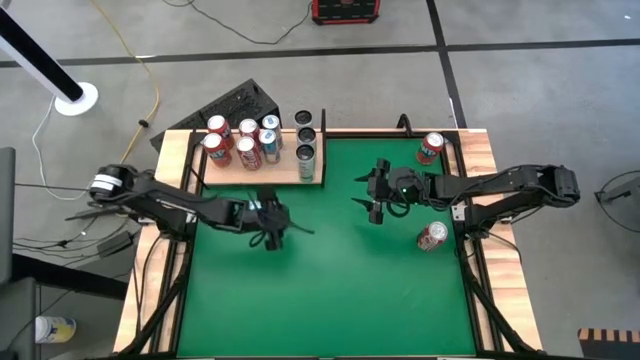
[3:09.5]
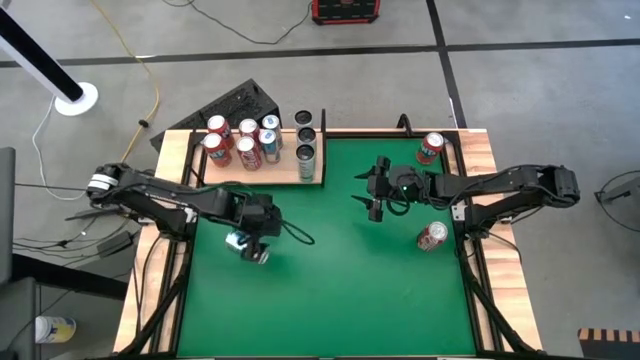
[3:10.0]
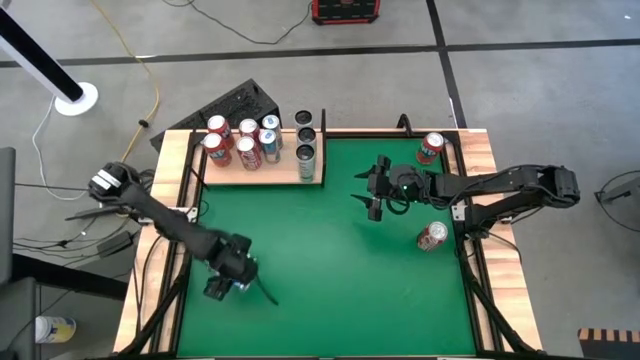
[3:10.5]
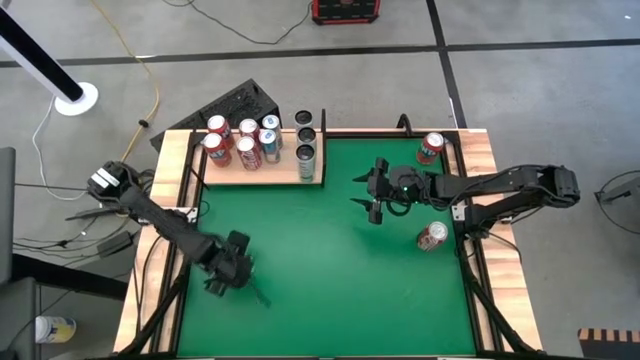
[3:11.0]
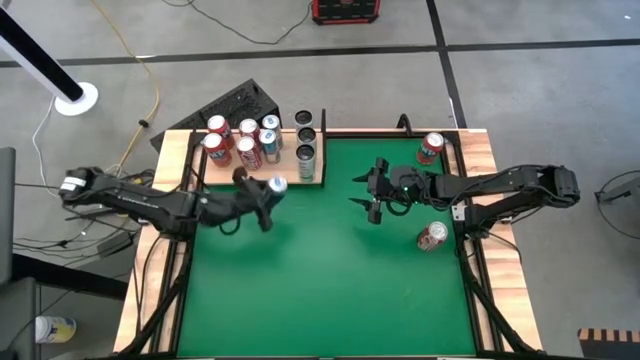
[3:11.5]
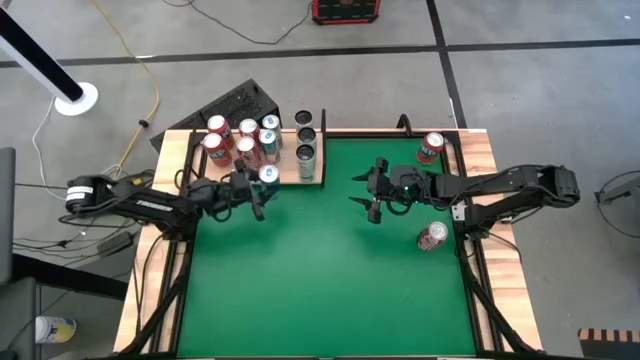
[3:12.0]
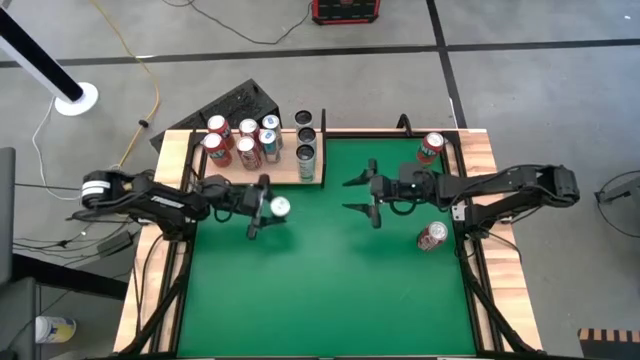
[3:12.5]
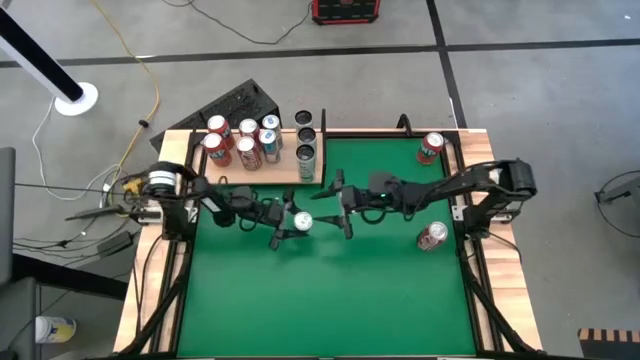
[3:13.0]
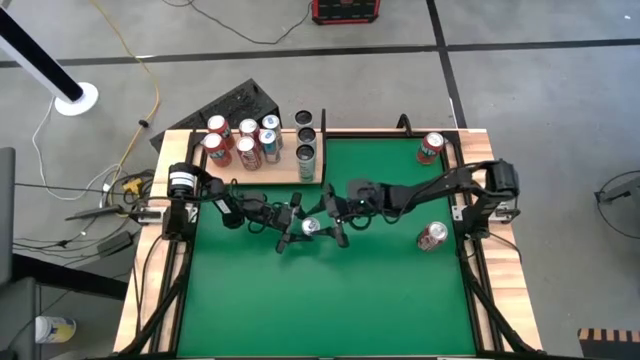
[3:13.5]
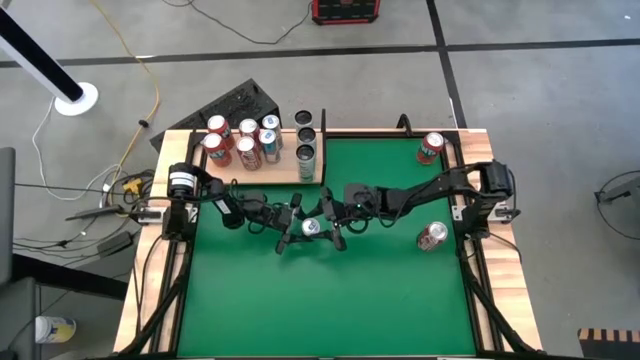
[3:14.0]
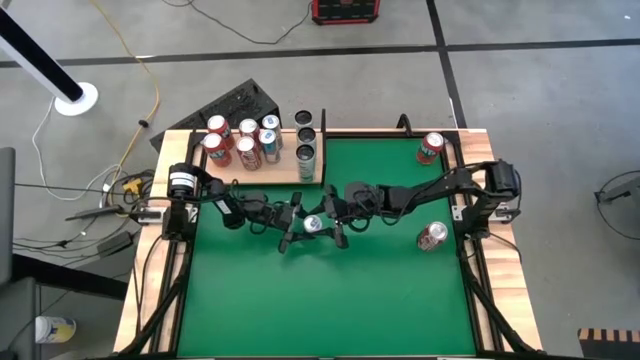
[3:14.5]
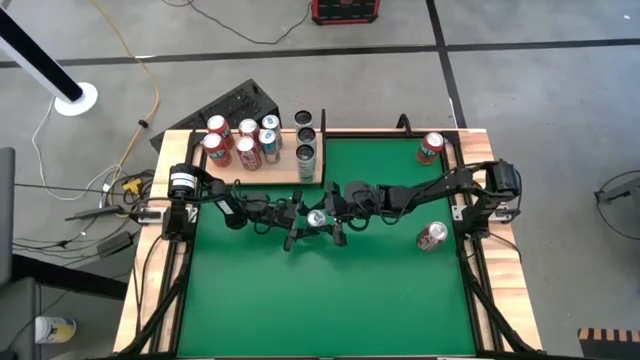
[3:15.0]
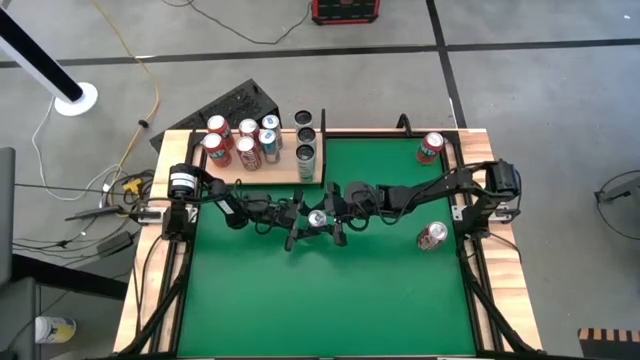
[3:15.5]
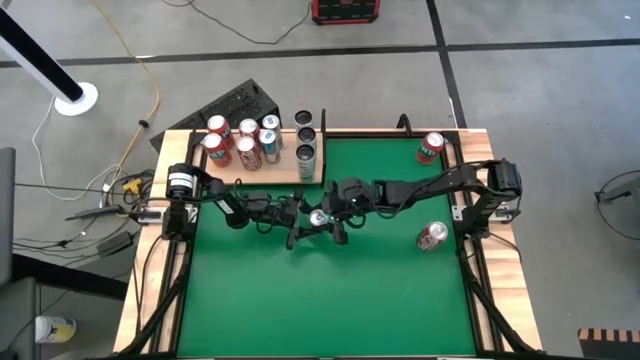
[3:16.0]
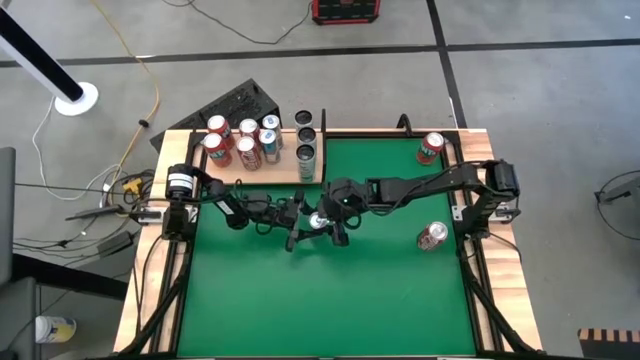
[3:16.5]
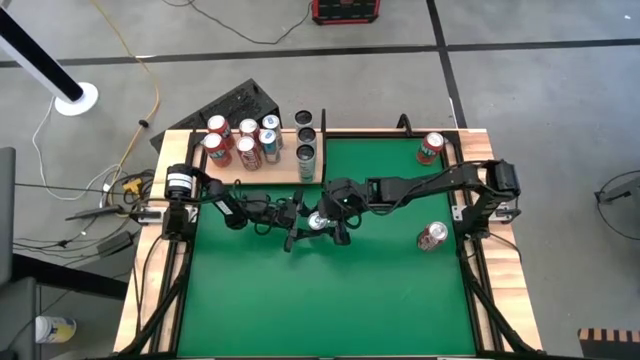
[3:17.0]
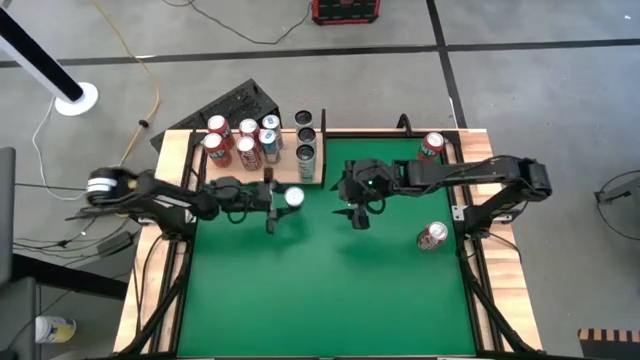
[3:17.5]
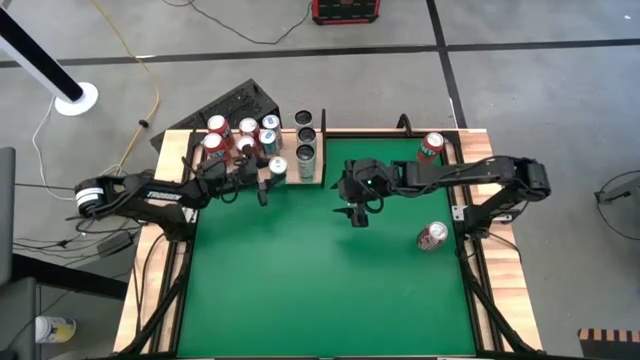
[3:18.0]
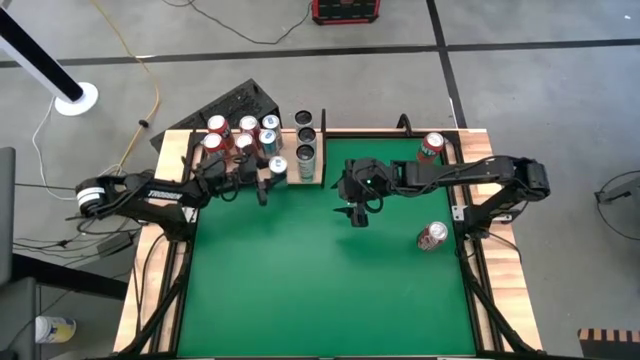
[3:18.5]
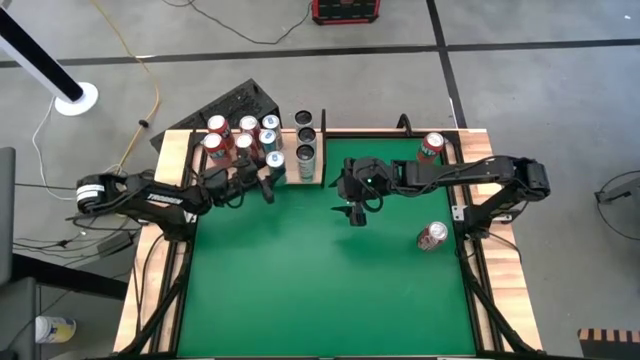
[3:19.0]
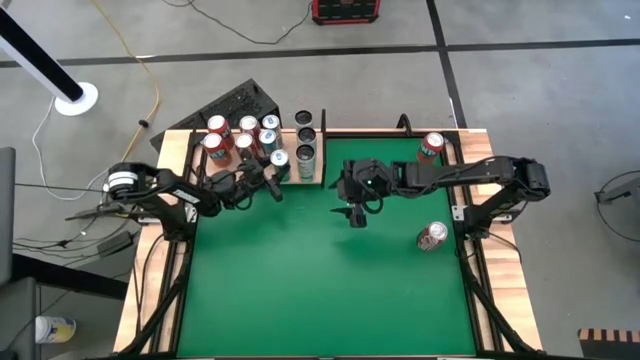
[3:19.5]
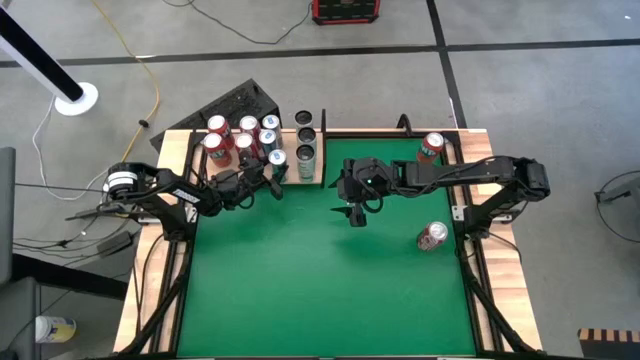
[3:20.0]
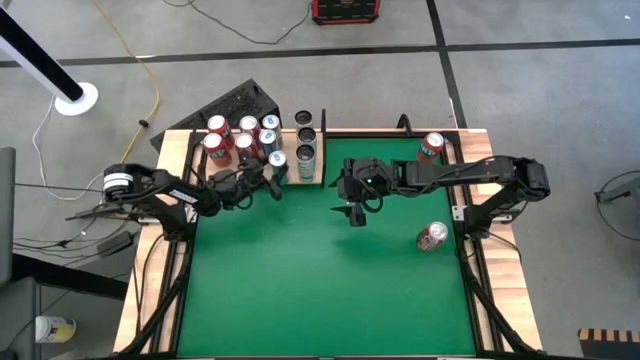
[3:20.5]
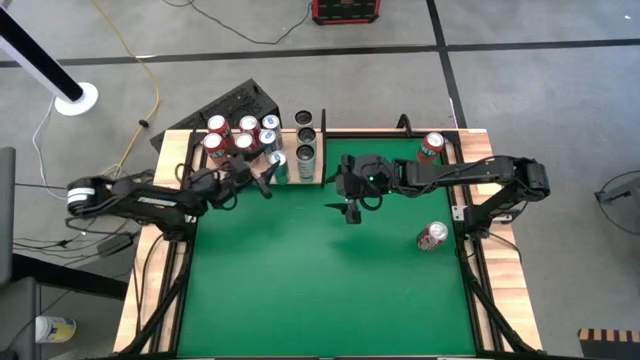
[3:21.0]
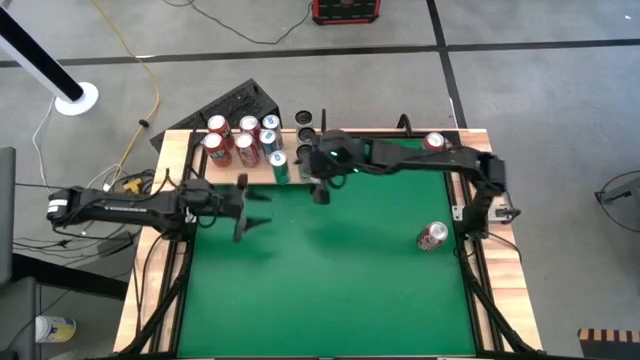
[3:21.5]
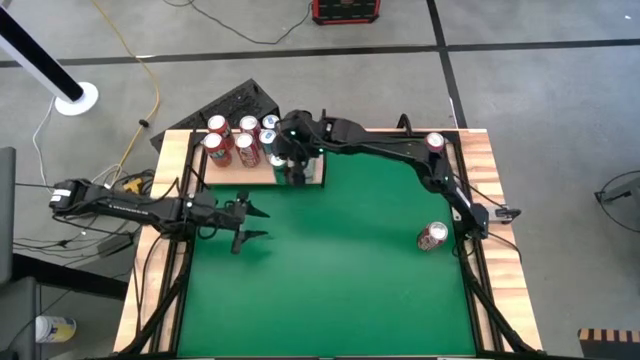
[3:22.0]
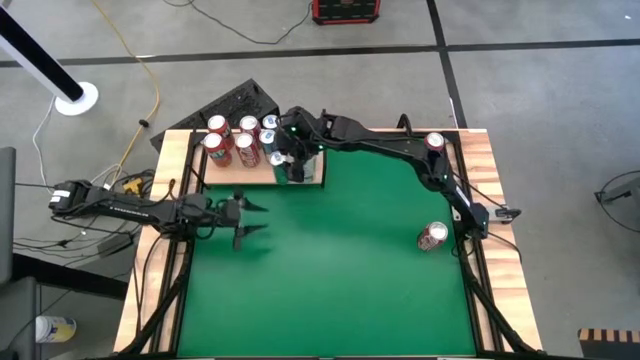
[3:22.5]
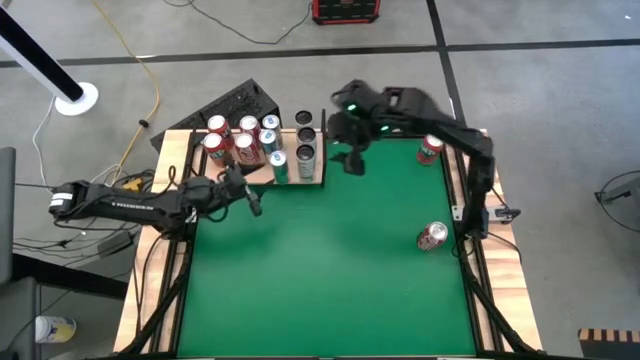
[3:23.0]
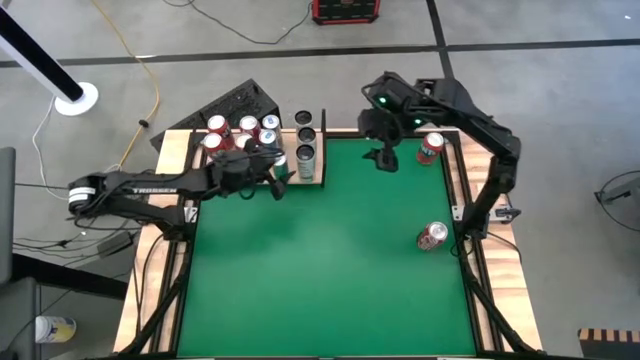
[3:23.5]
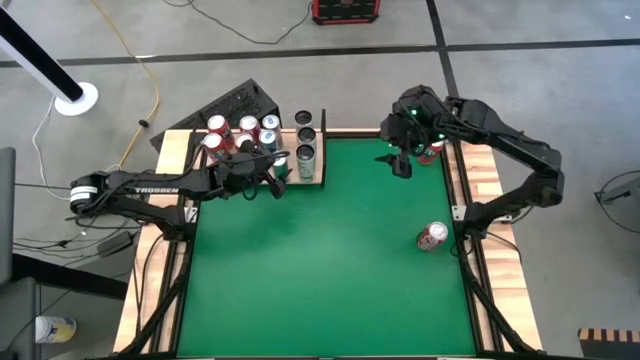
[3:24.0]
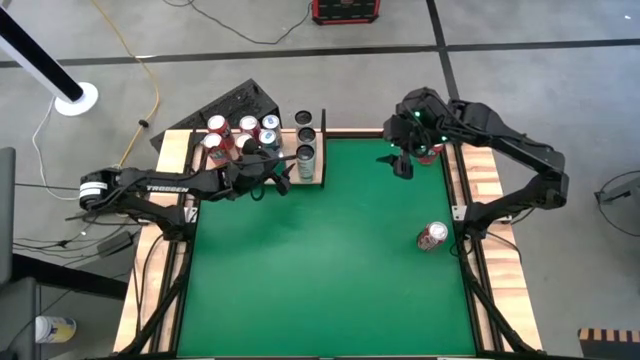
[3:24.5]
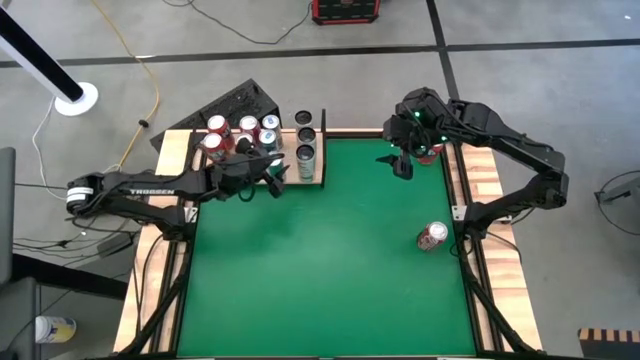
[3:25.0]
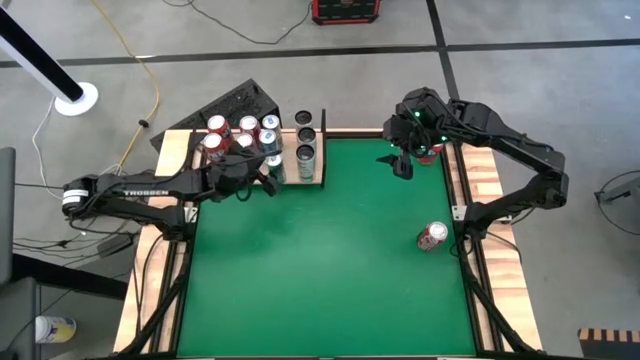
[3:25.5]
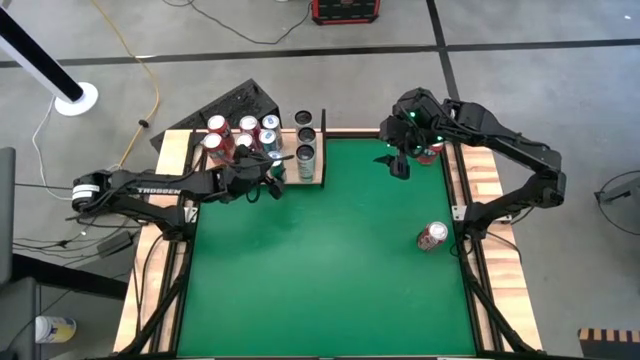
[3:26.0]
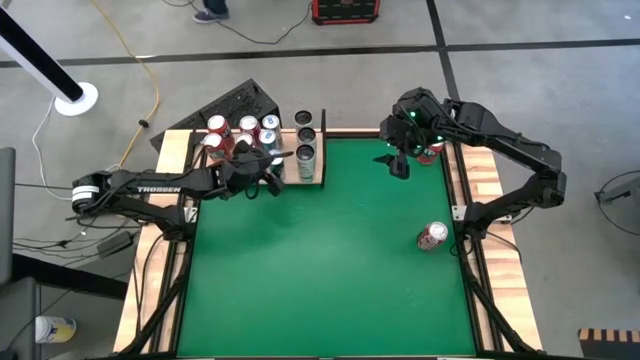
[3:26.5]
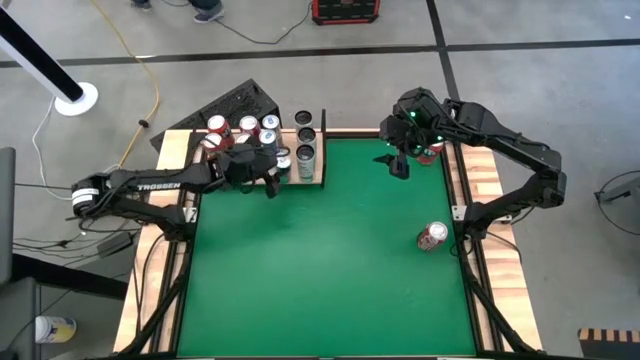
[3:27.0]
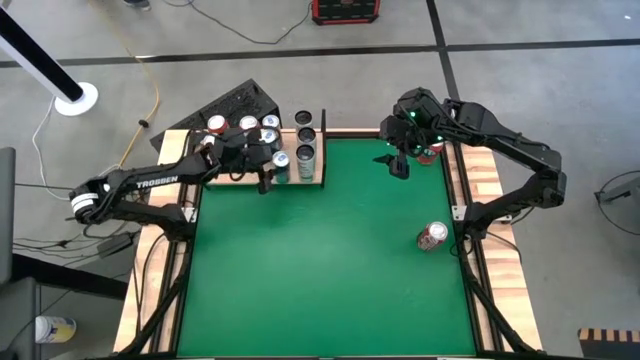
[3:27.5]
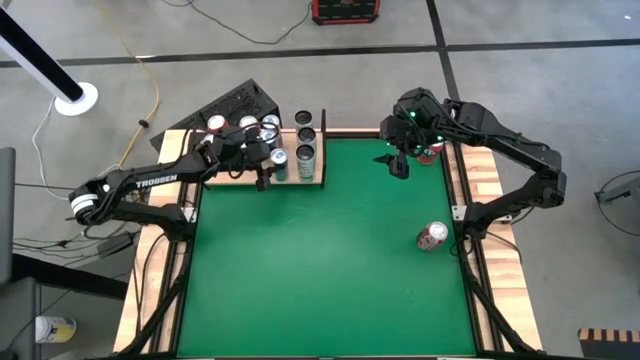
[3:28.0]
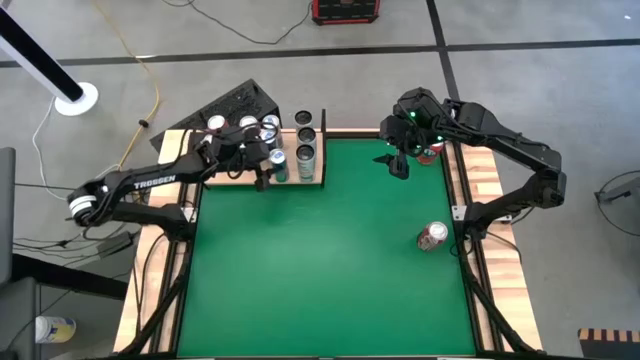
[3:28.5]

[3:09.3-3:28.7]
Task: Place canned beverage on shelf
Put the blue soda can on the shelf aligned with the other blue soda cans

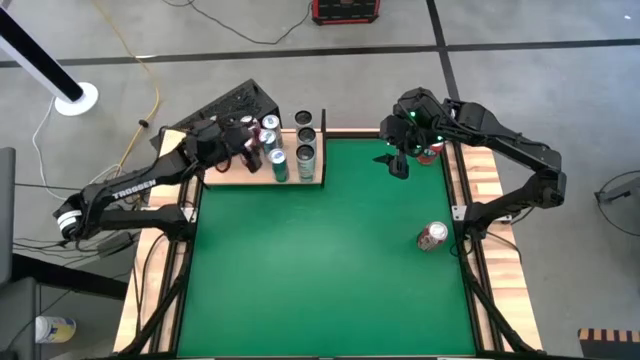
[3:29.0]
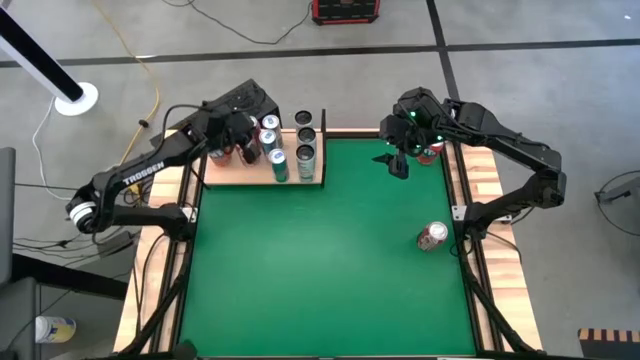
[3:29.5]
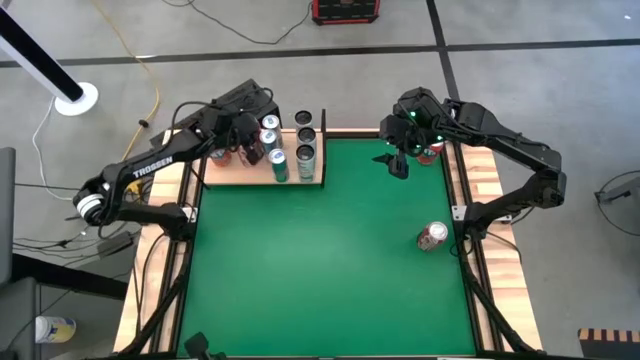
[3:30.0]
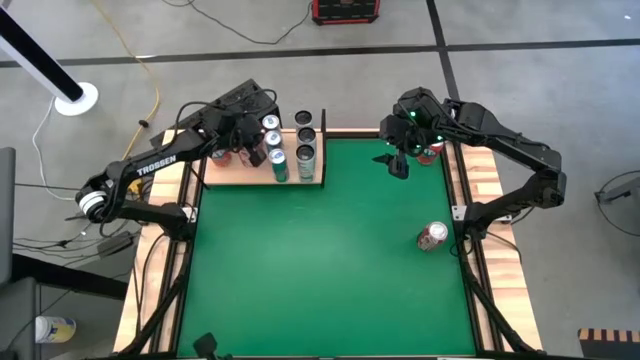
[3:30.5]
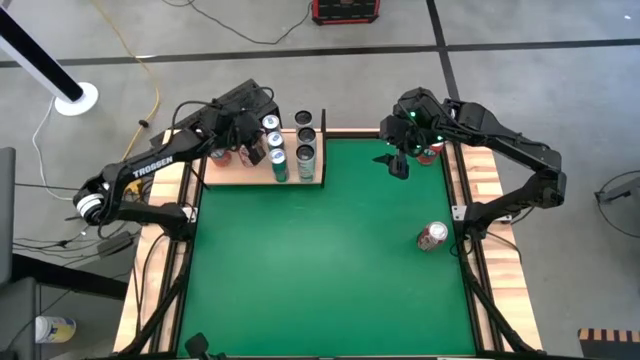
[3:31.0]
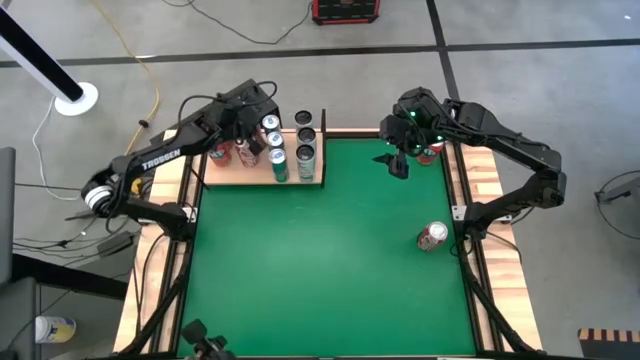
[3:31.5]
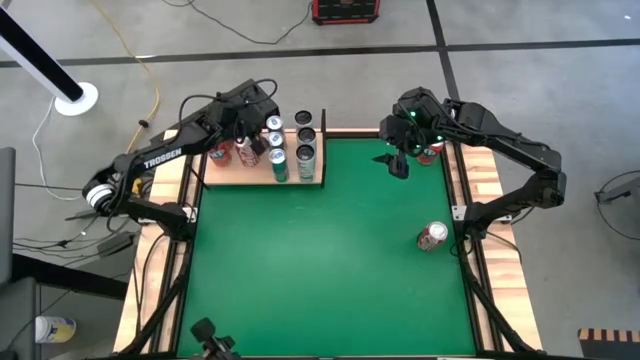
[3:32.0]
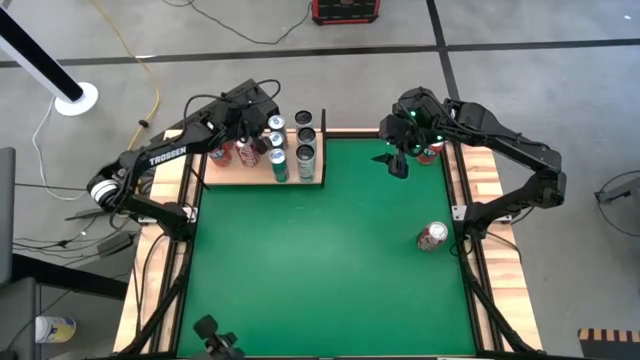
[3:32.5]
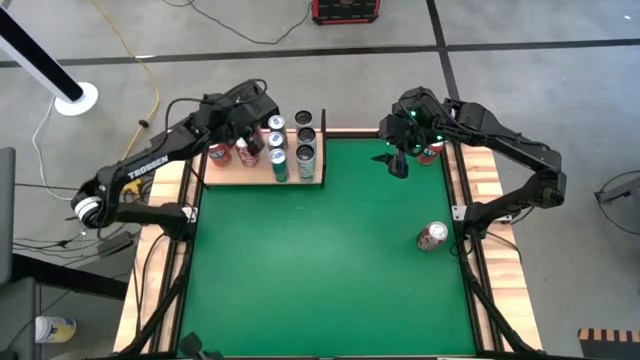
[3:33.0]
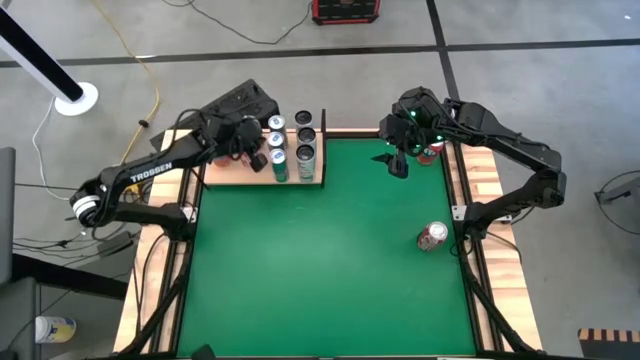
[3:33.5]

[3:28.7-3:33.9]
Adjust the blue soda cans on the shelf
